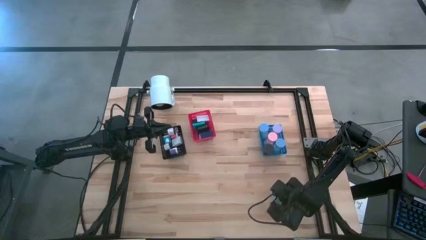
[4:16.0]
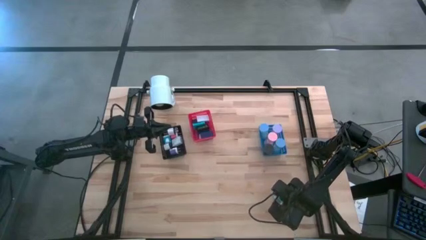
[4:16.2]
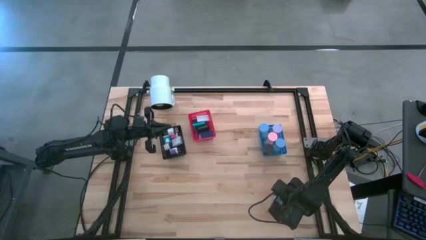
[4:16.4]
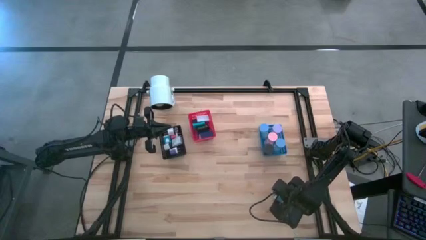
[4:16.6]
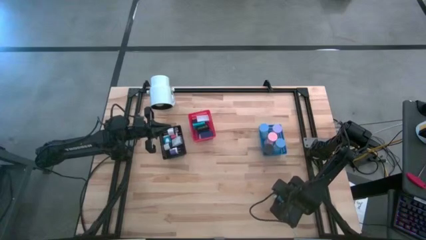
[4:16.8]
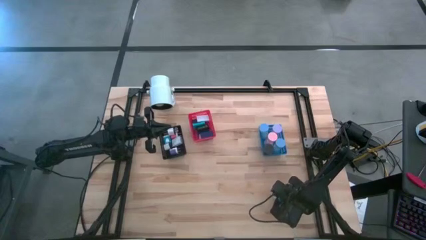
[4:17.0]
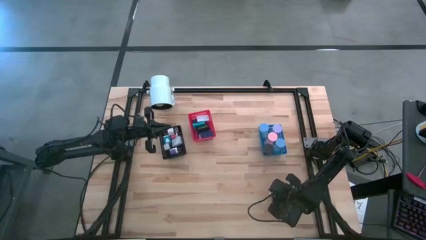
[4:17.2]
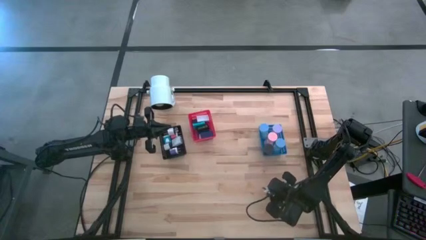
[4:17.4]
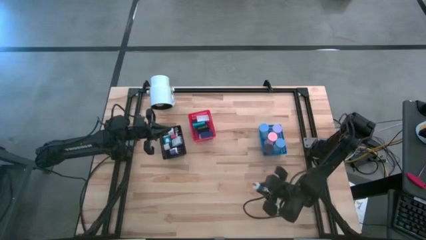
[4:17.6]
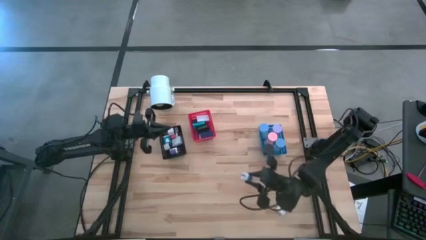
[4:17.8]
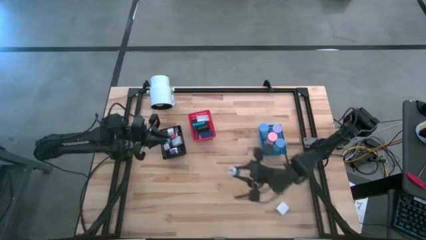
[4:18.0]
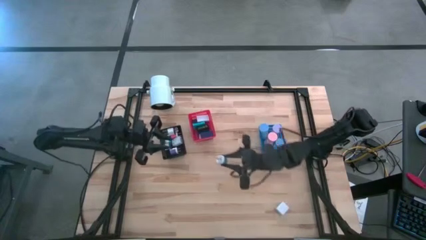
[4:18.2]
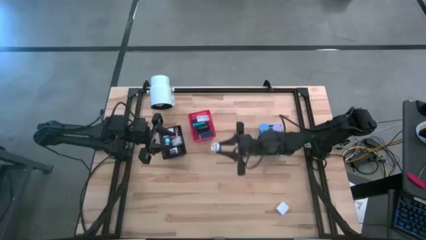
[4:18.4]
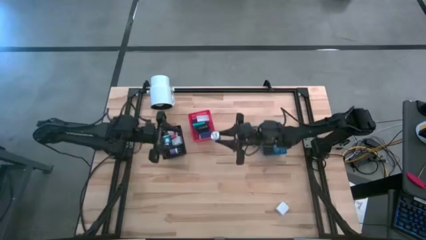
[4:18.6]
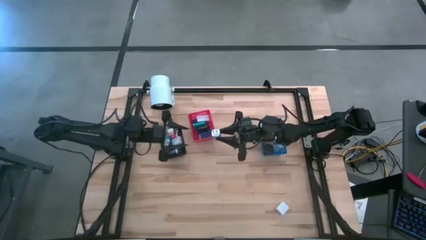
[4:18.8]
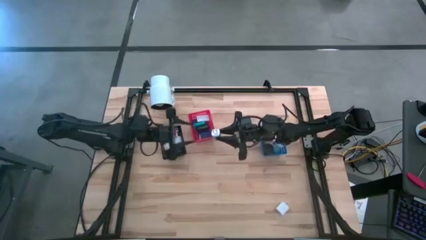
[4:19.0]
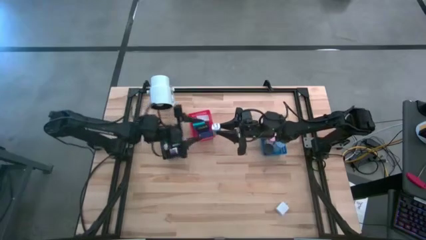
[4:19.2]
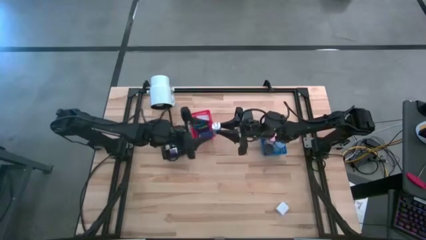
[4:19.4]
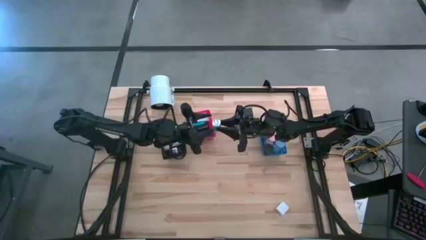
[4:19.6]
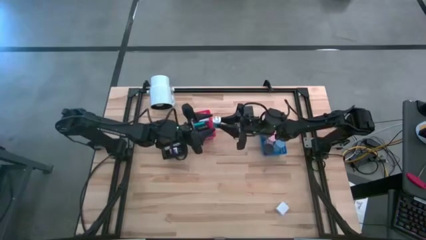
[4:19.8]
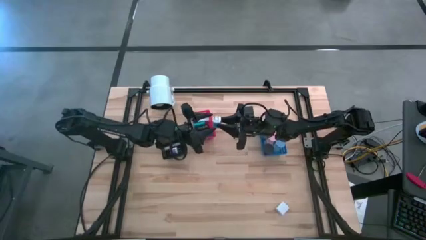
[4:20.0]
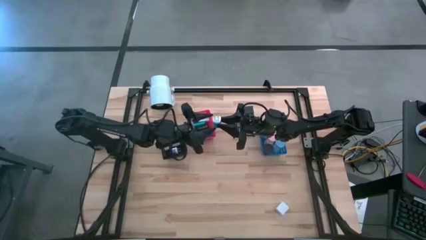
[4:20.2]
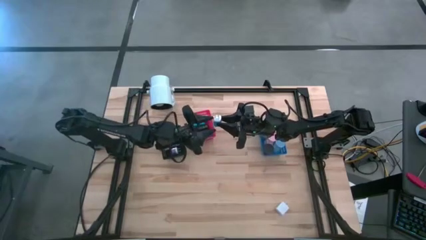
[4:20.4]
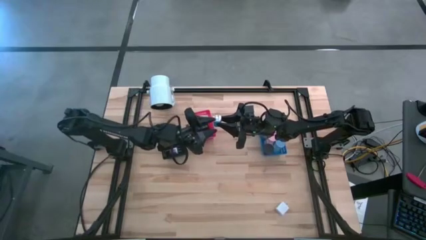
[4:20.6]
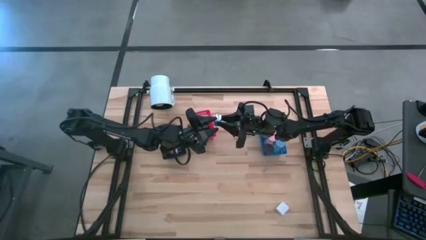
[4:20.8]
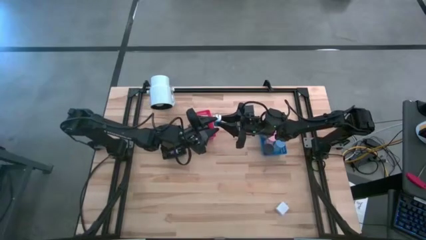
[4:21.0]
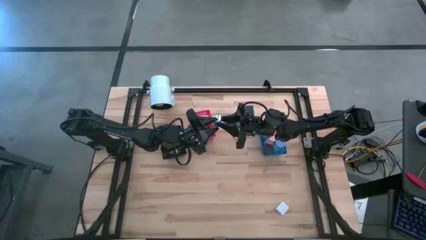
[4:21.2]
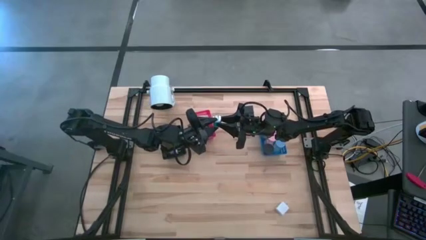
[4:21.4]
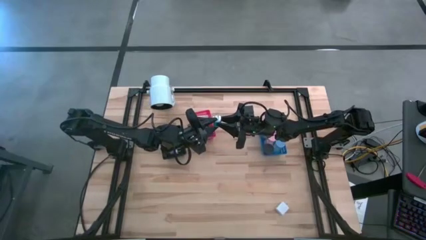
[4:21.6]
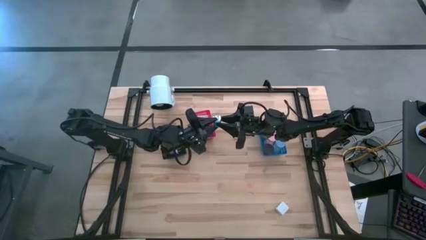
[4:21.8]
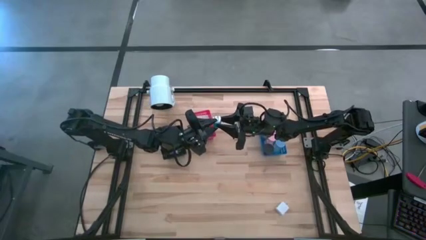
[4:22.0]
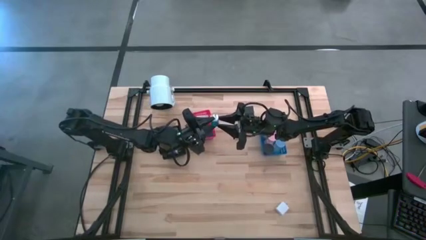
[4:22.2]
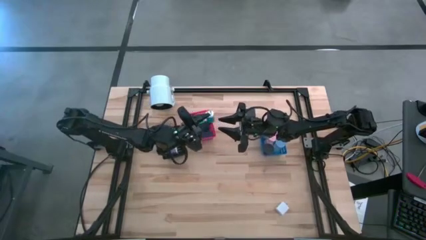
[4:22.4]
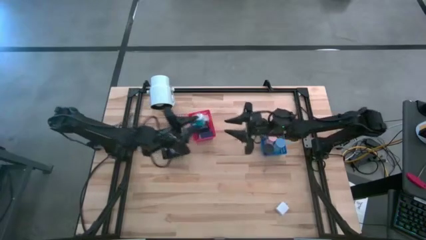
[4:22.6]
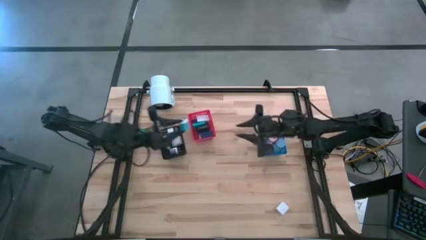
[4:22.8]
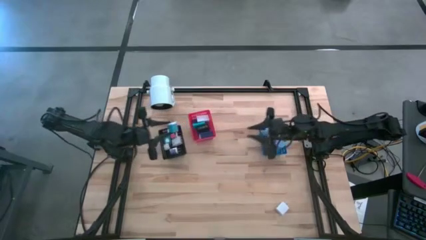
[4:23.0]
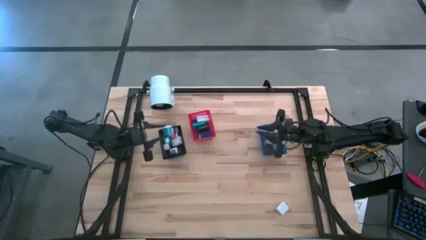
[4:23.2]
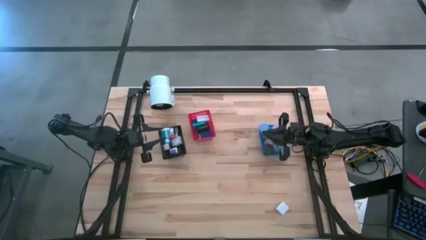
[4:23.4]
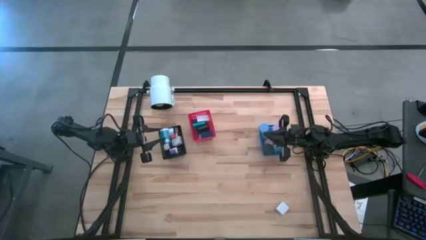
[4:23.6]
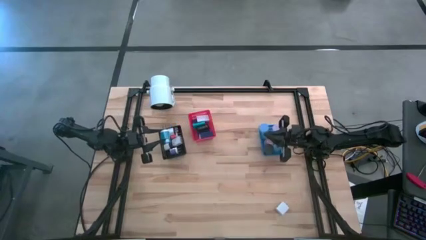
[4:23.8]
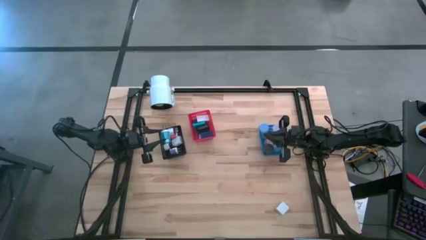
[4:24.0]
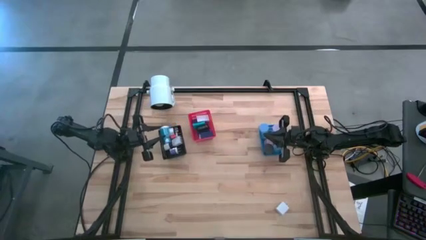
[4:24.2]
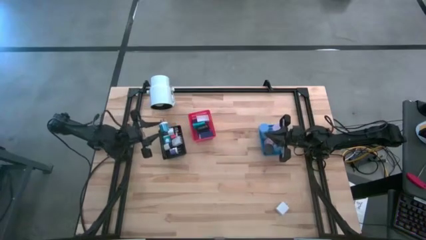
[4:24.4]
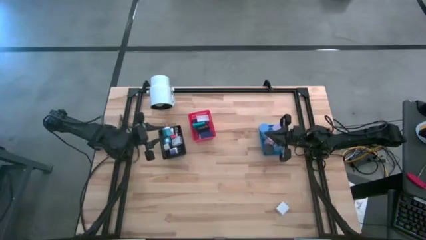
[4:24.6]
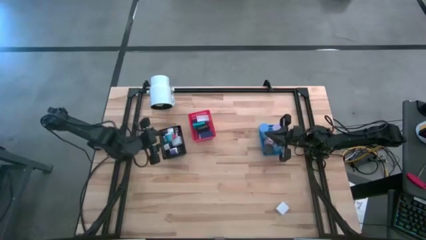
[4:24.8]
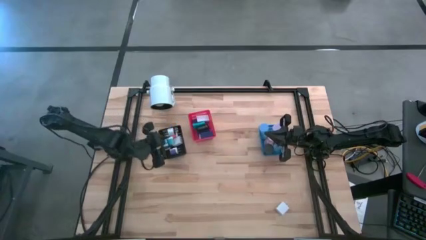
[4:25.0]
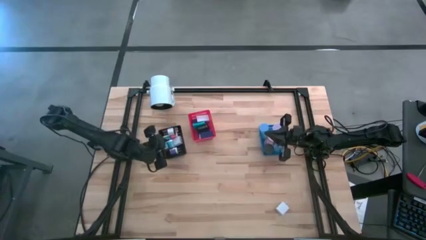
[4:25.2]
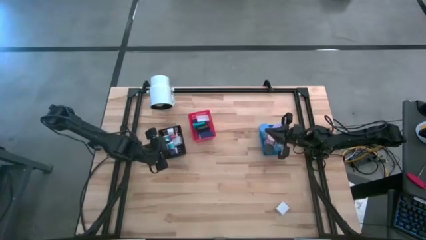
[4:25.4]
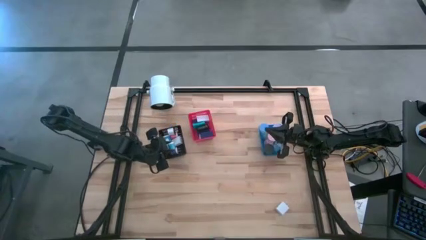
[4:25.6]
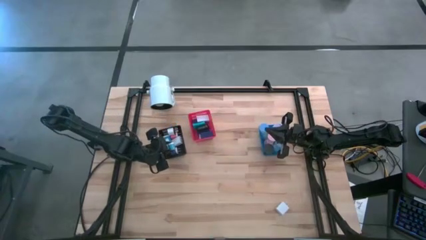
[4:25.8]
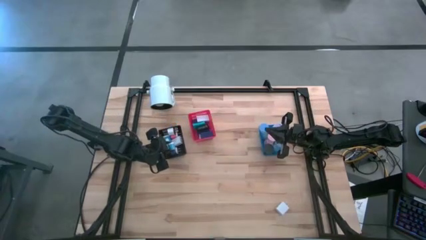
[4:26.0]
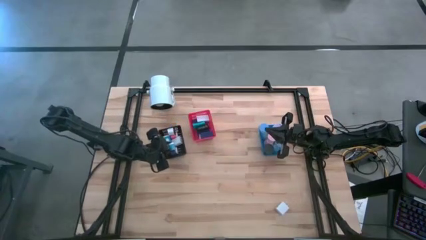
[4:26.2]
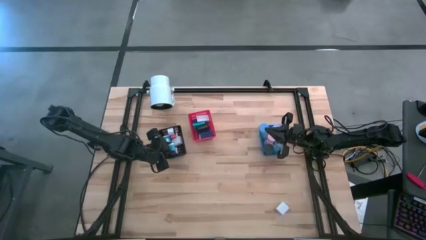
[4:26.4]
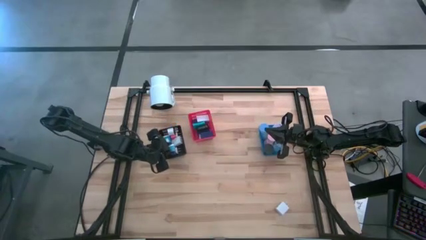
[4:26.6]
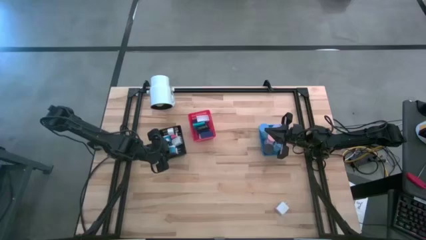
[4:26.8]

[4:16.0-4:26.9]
Task: Pick & Place Office items
Put the light blue charger adapter into the black bin

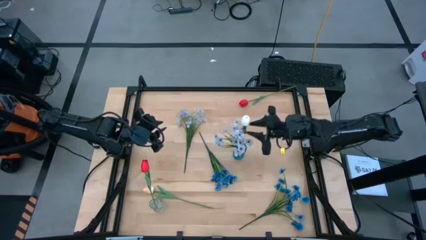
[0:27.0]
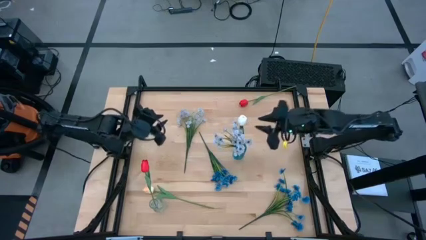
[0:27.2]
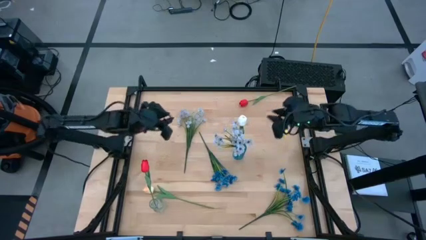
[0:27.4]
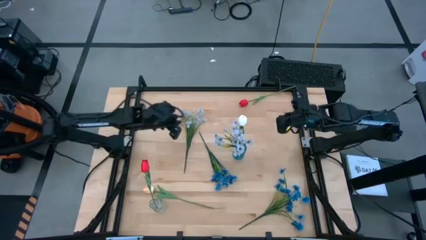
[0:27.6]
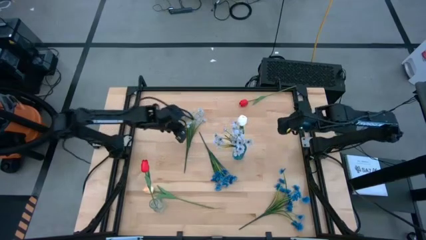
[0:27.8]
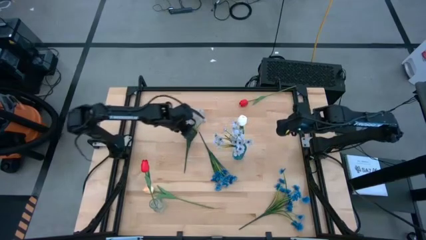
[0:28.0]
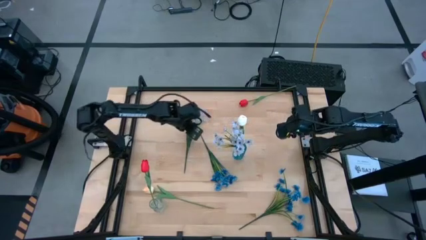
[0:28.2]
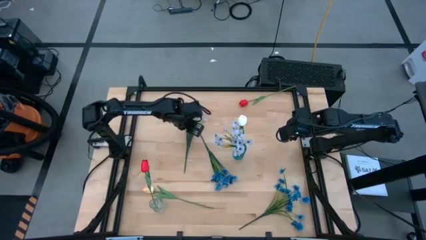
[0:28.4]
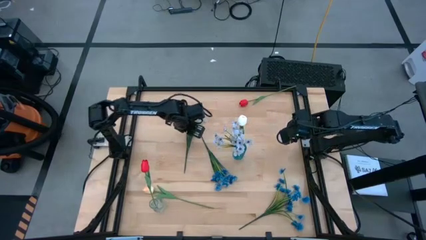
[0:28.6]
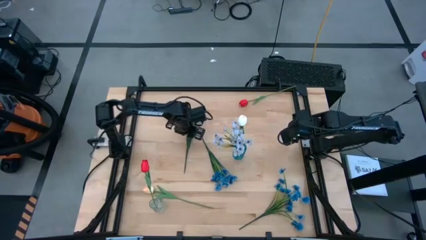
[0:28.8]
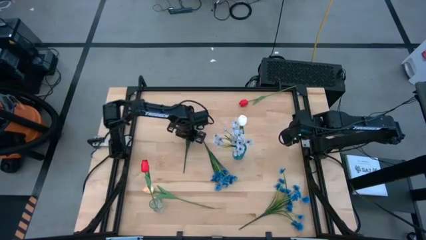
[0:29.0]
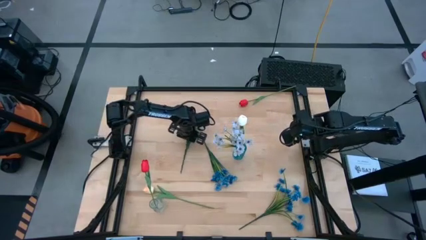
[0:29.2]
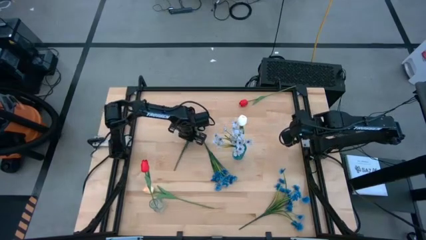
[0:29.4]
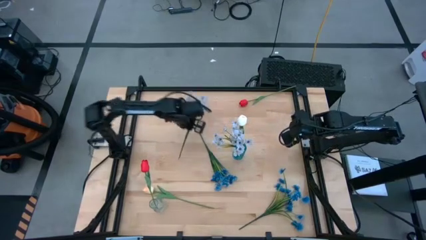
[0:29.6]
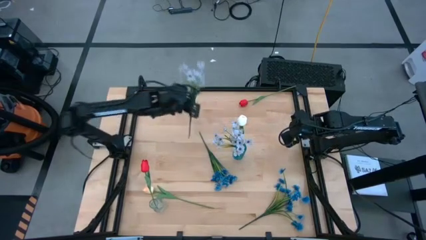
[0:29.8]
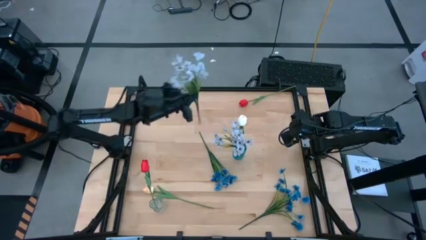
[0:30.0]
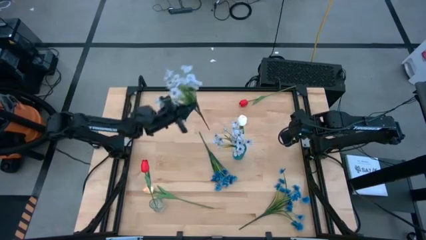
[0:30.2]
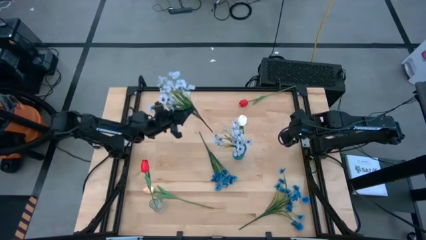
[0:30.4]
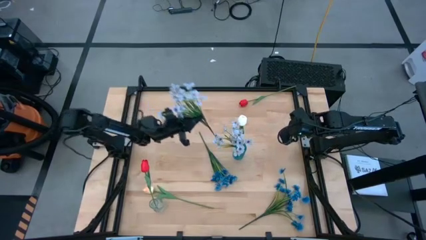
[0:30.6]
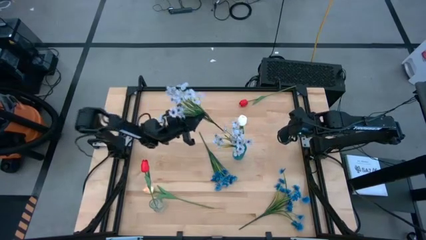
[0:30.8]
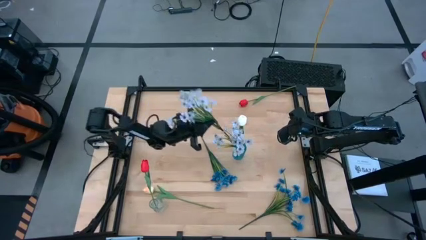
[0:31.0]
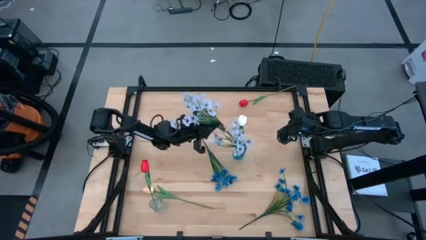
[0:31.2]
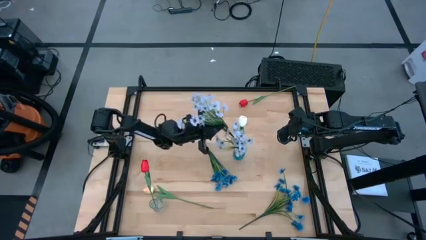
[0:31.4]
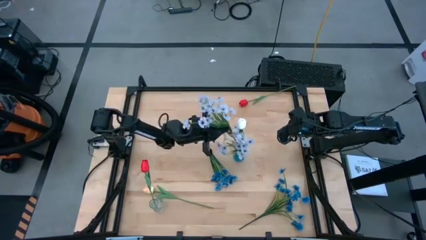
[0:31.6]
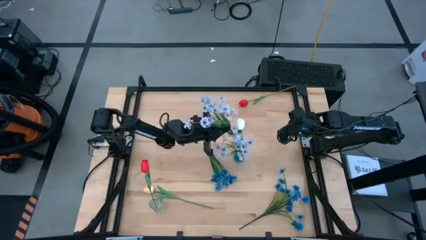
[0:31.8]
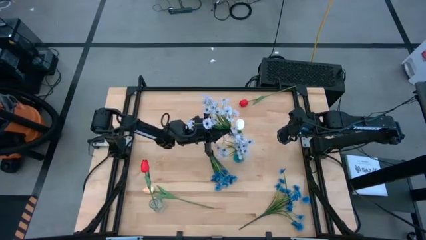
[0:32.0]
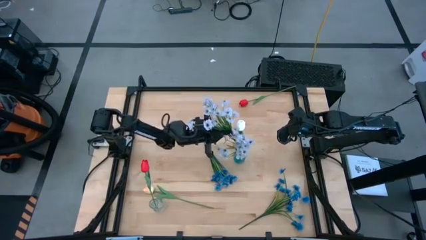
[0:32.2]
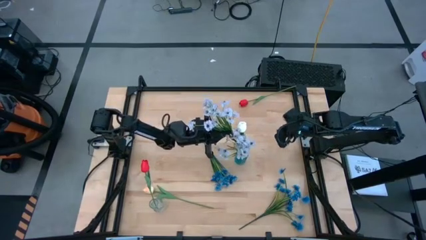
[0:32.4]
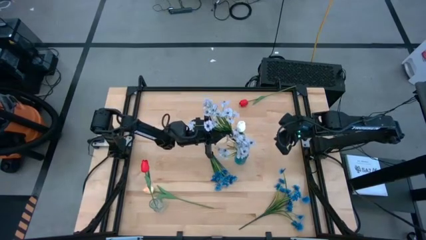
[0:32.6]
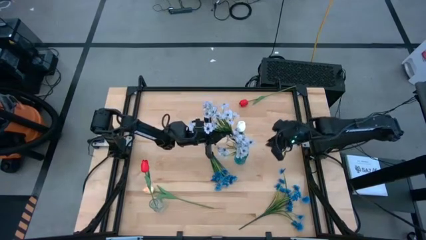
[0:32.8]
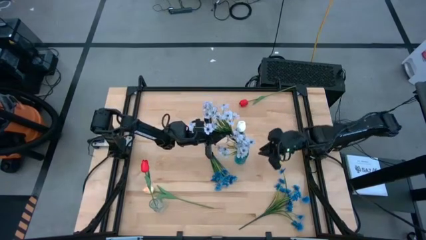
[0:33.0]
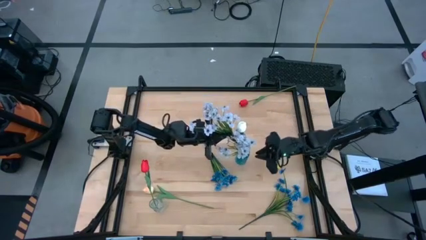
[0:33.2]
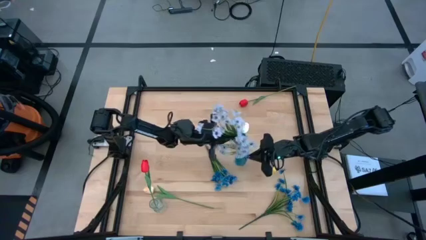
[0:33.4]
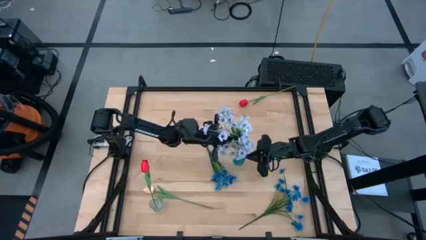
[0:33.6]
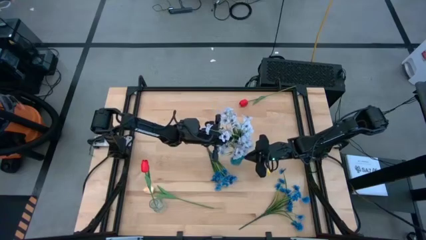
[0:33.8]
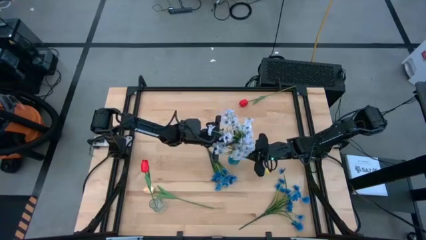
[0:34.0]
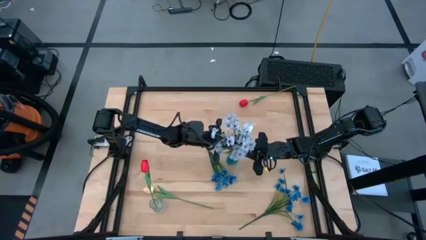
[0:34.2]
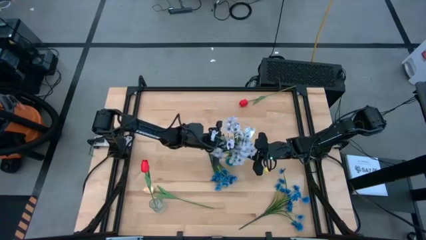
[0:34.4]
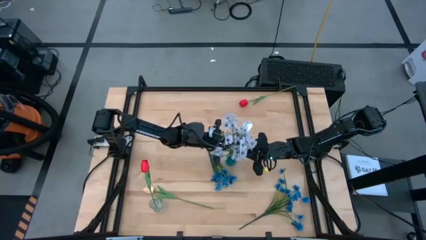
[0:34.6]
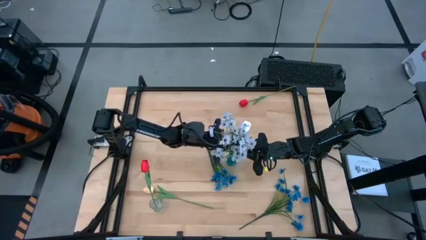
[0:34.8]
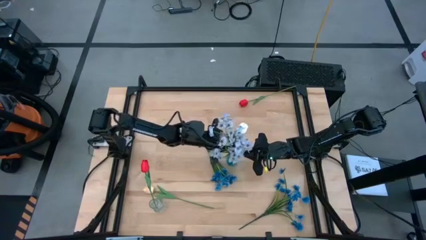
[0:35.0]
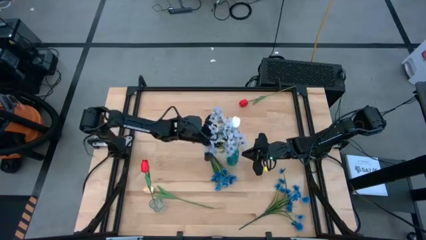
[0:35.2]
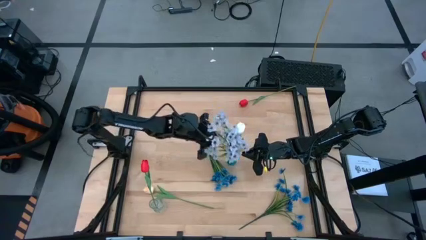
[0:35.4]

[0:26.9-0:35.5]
Task: Sort flowers into vase by color
Put the white flowers into the blue flower vase
